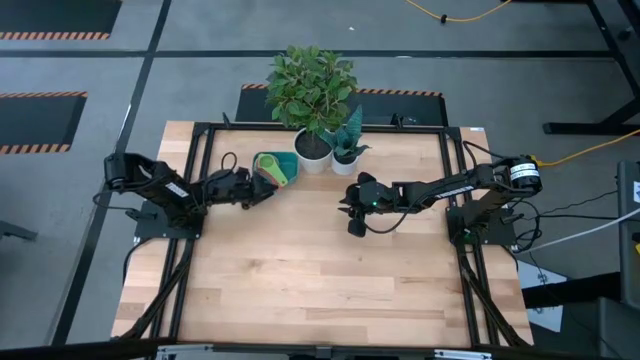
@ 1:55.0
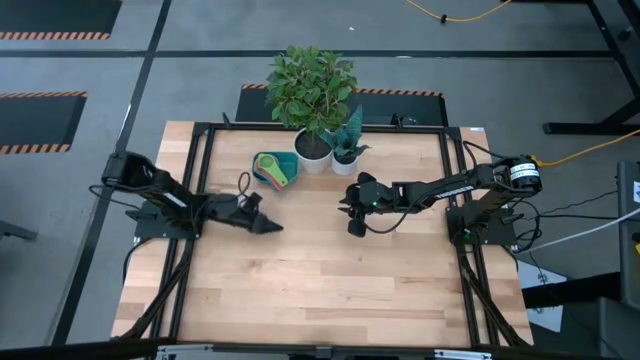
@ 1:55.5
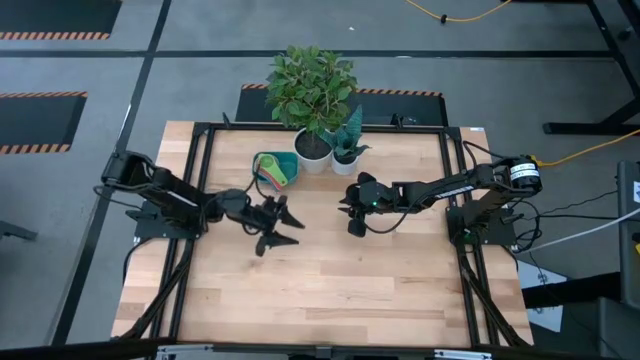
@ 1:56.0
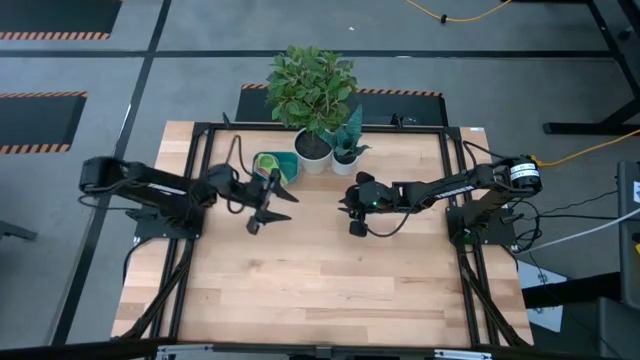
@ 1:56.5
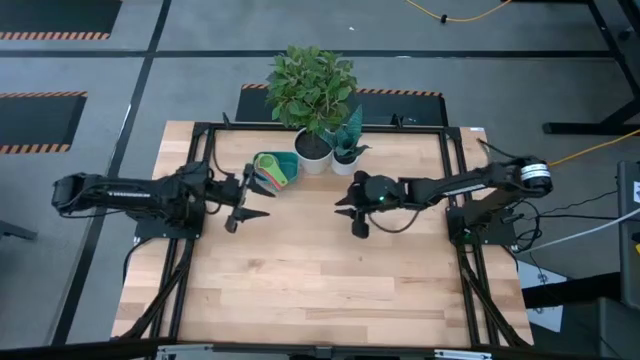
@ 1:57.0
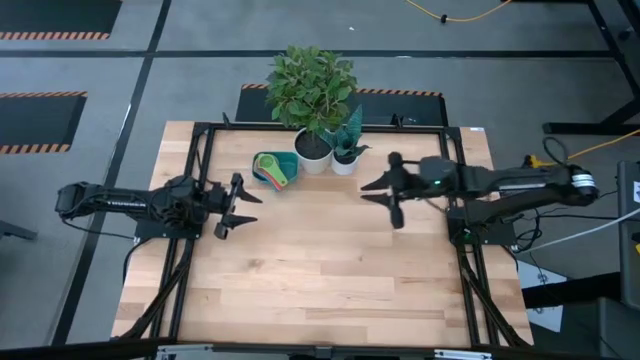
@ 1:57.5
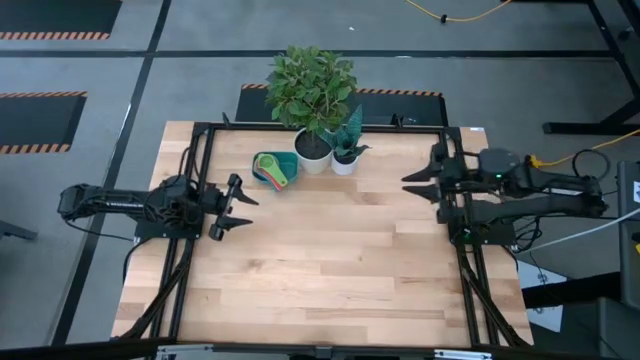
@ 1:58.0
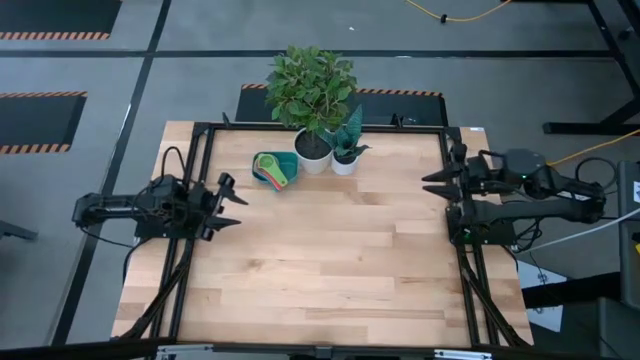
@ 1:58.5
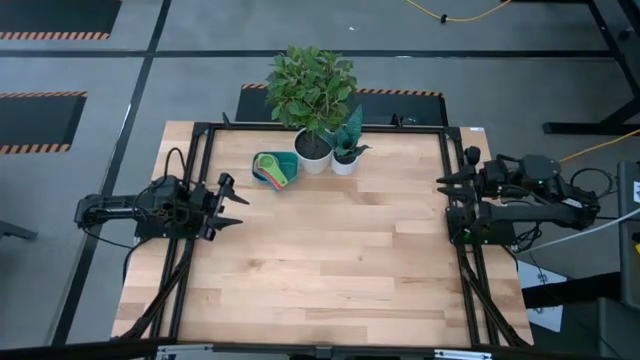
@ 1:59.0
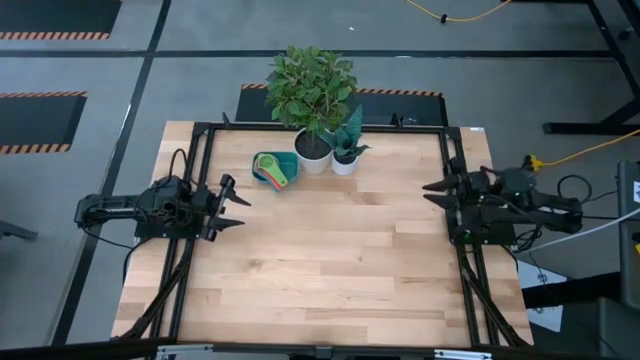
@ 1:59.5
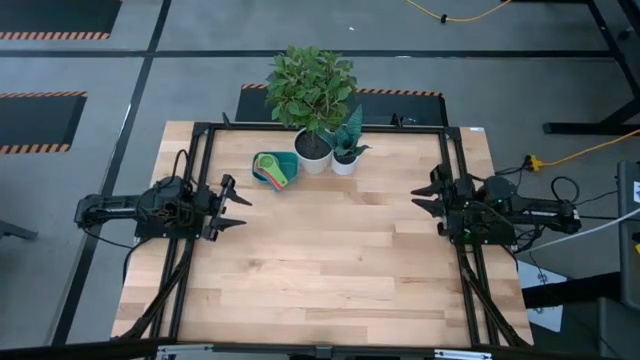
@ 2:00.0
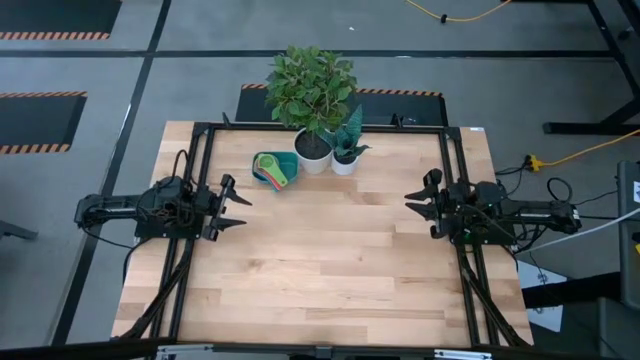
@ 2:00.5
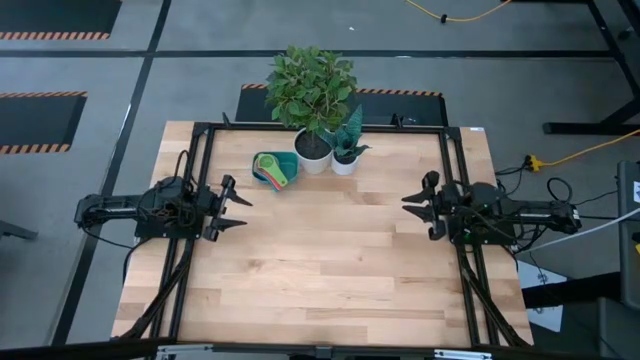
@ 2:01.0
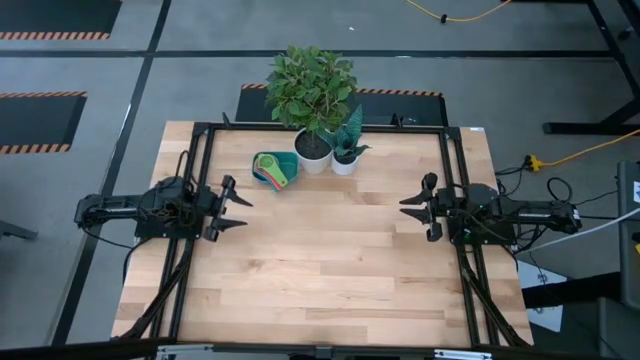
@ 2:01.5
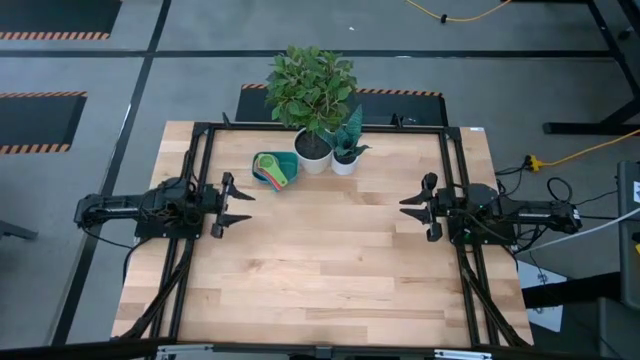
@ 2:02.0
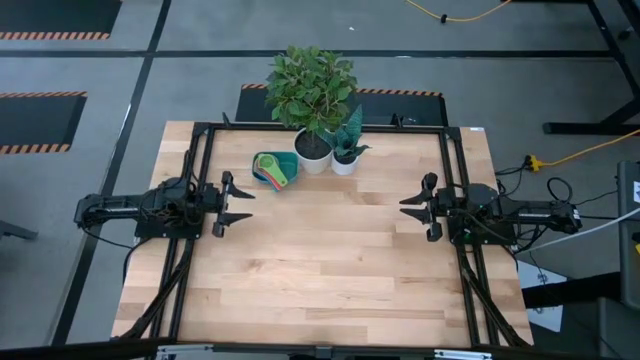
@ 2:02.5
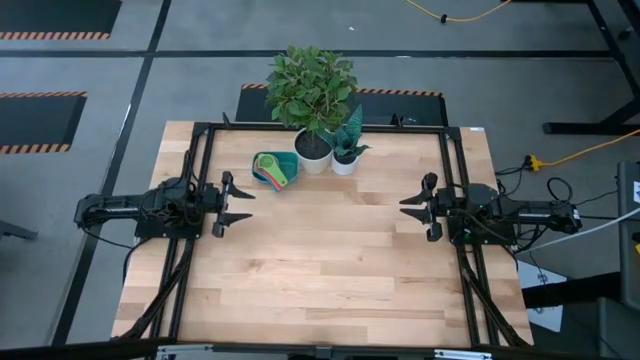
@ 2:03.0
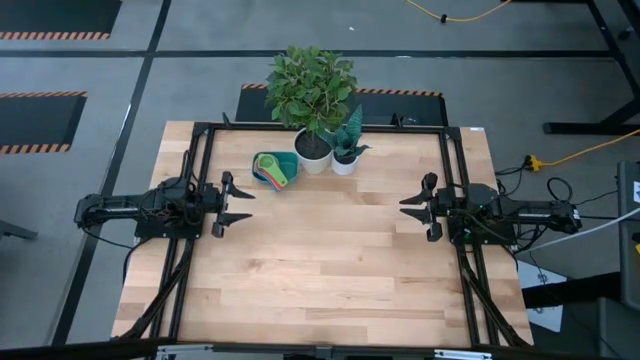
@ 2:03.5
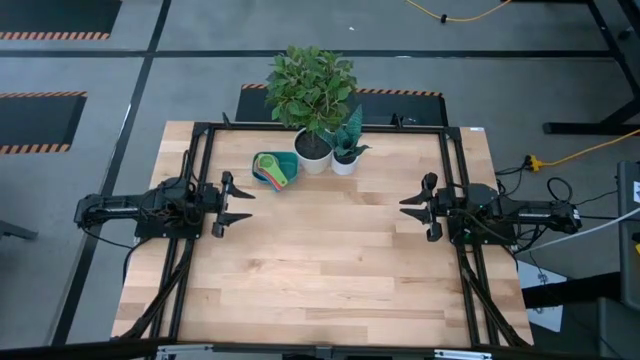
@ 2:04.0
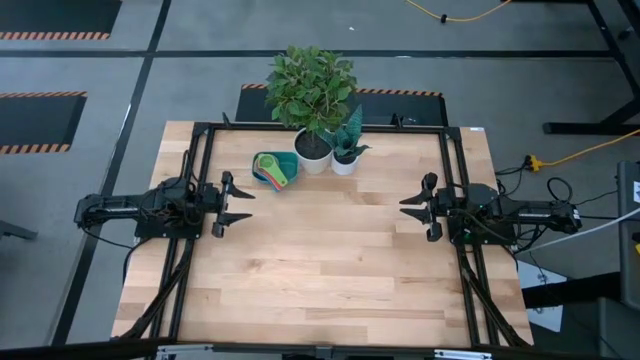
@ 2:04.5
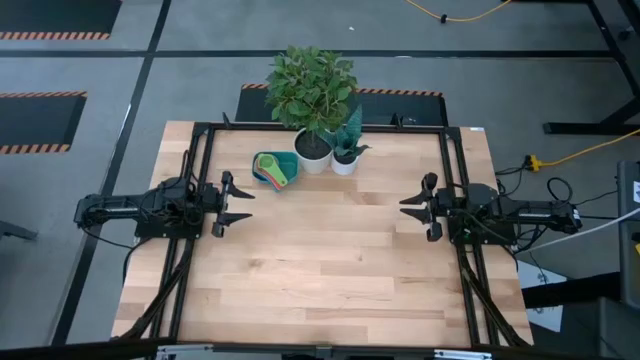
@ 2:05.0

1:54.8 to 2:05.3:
Task: Nest measuring cups in basket
Return to Home Position

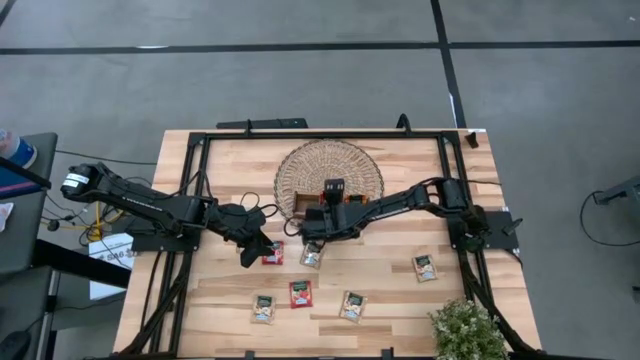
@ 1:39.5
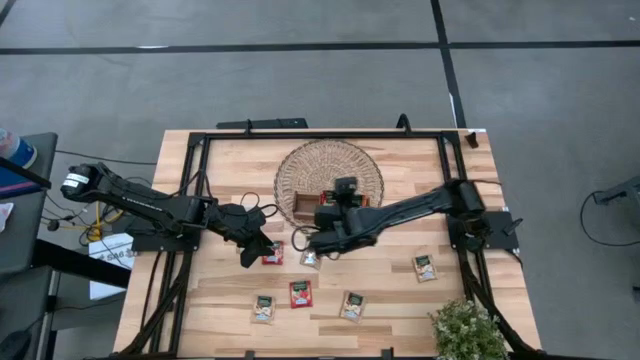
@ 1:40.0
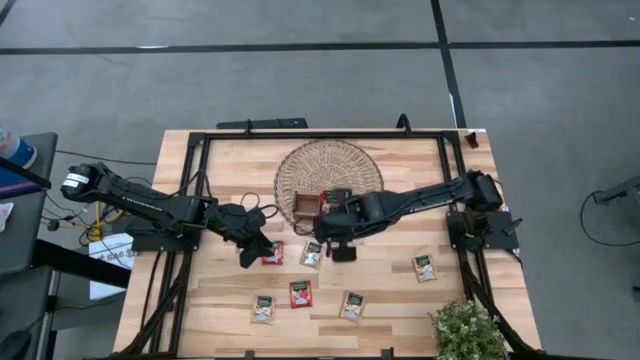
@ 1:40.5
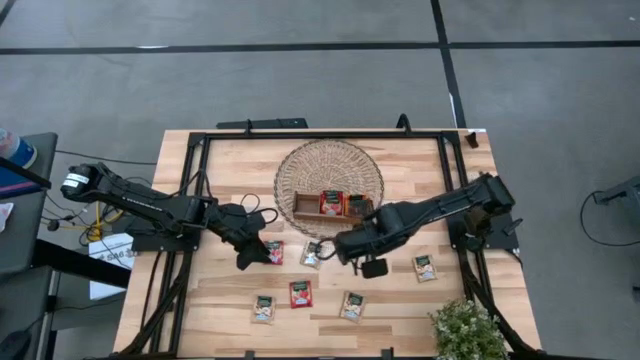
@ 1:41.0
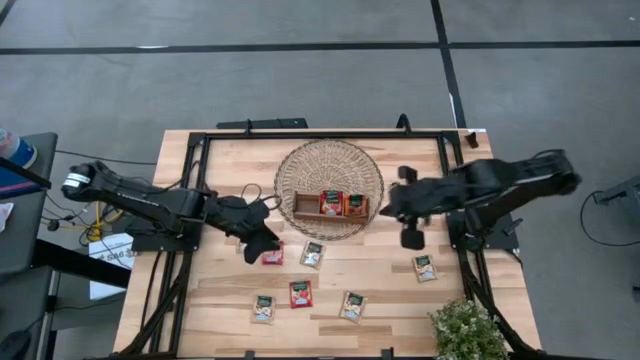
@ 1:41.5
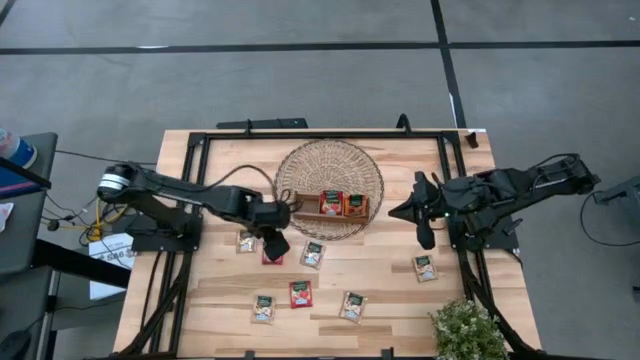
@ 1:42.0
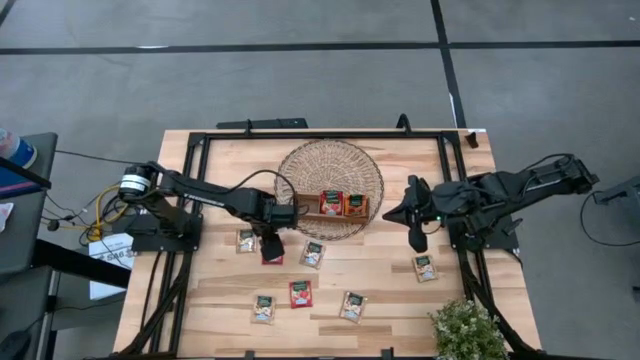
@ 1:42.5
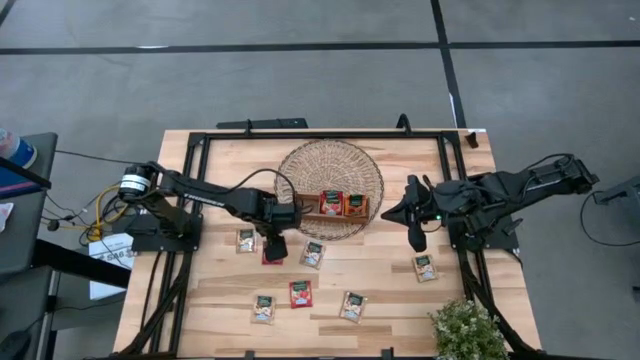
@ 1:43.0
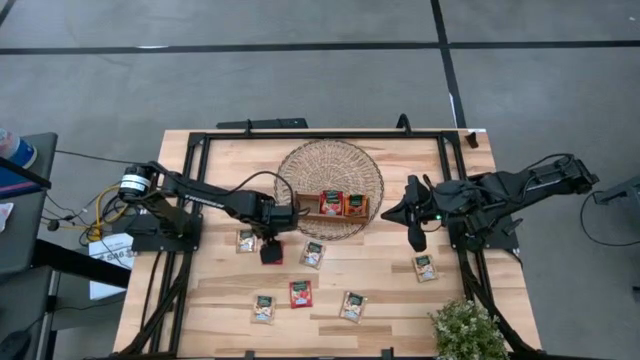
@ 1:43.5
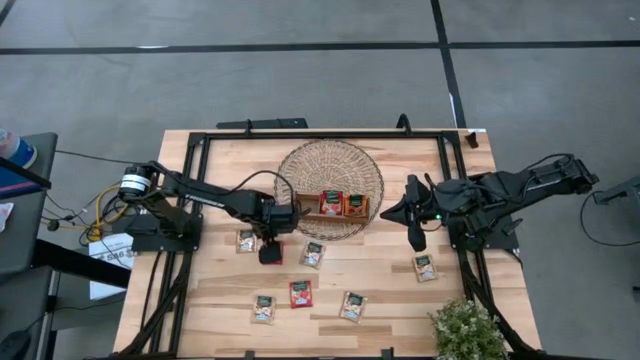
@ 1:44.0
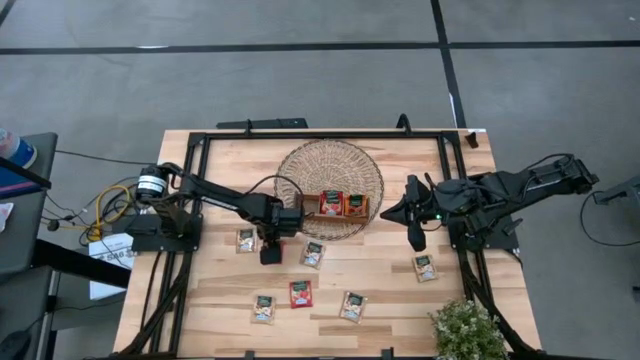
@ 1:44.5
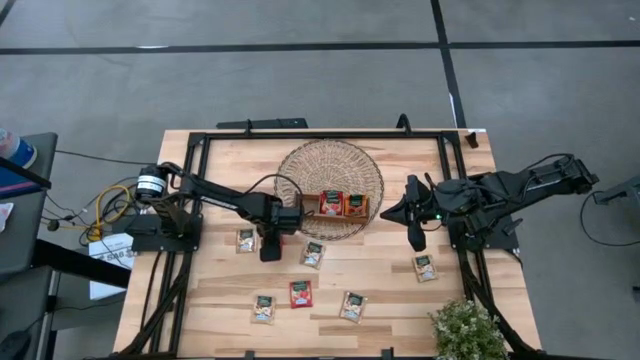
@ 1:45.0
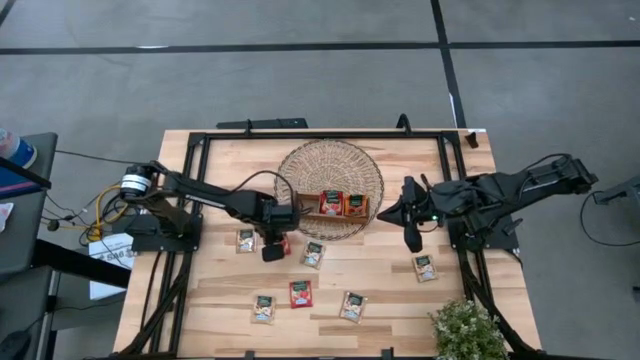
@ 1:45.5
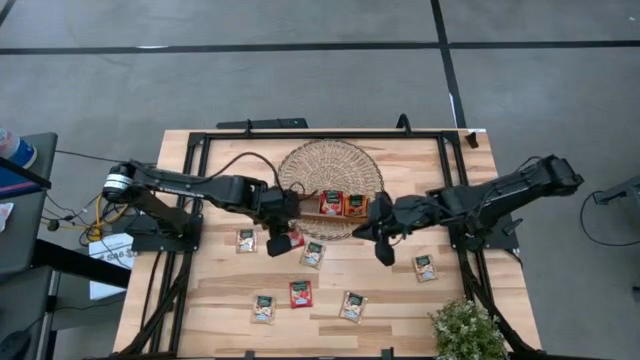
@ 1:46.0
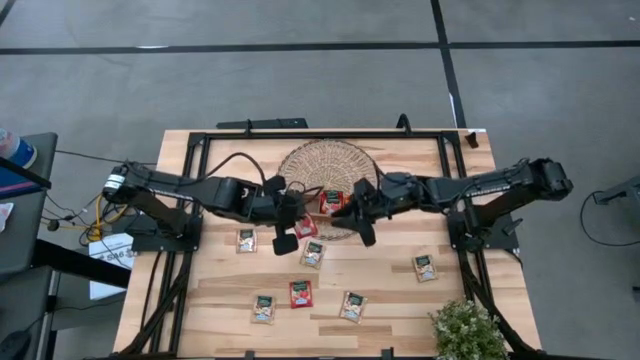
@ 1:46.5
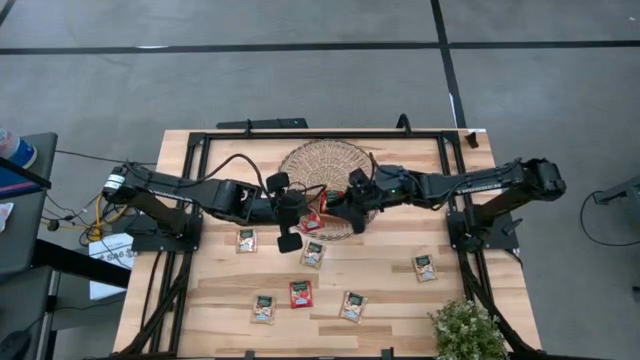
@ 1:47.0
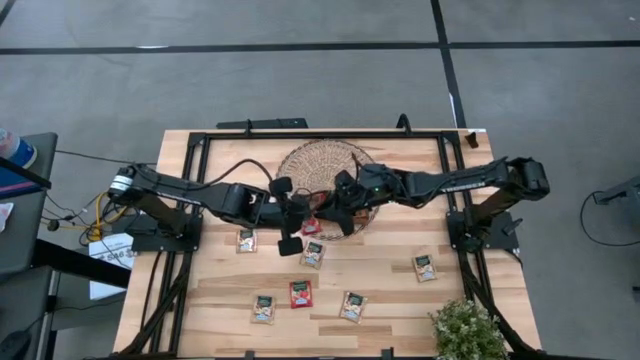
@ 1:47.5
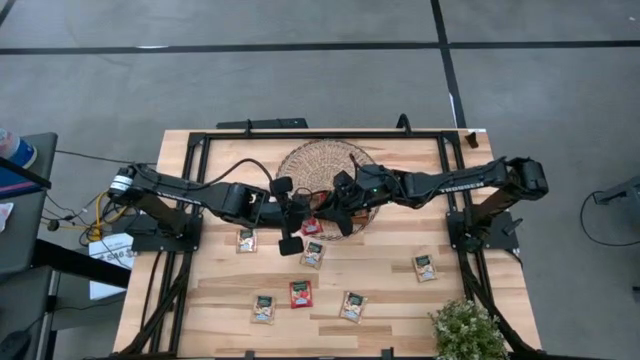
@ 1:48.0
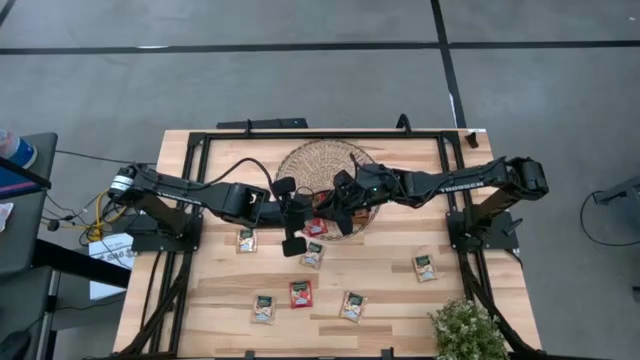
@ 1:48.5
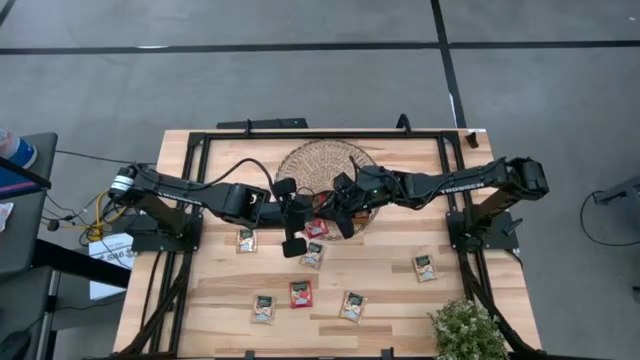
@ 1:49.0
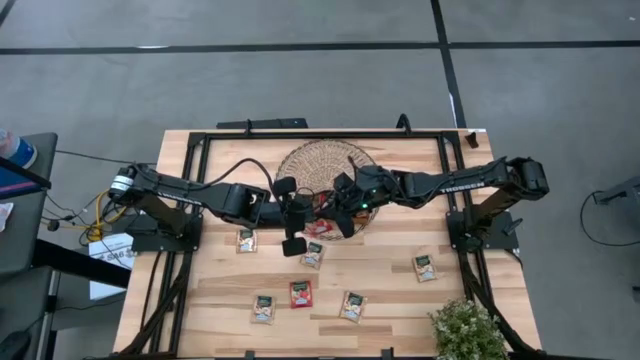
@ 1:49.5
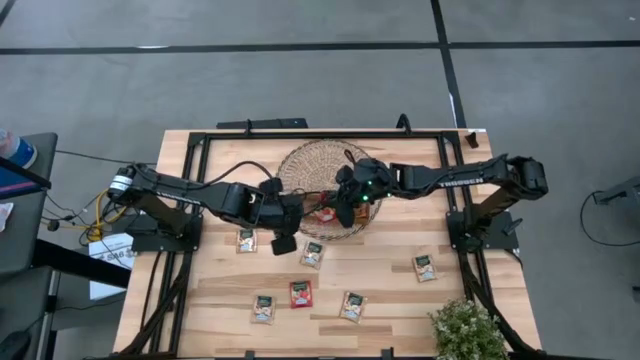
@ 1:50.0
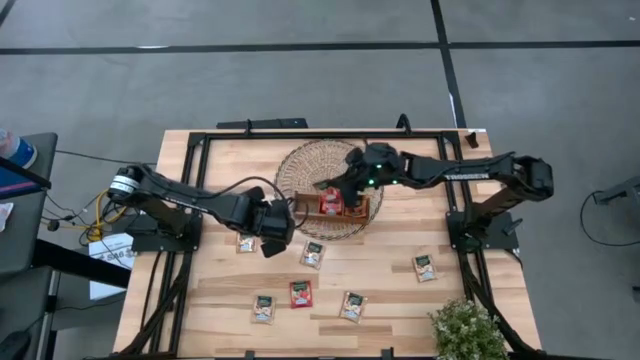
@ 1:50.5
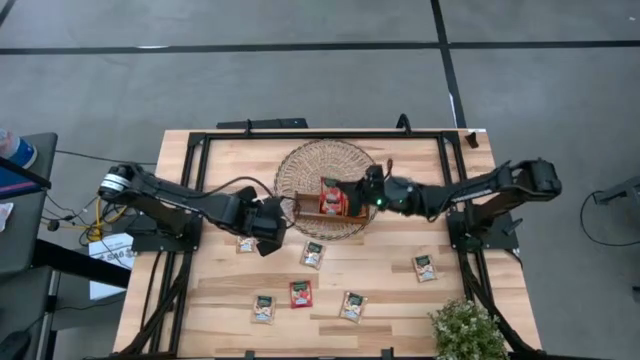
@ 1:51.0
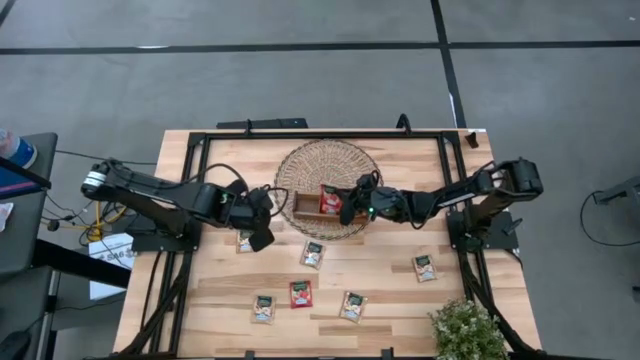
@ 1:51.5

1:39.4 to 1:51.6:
Task: Pick & Place Tea
Put the red tea bag into the middle section of the wooden organizer
